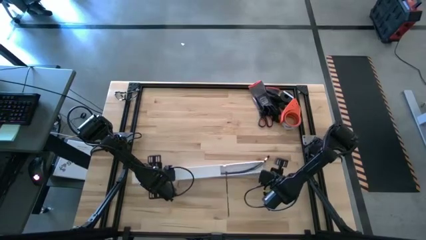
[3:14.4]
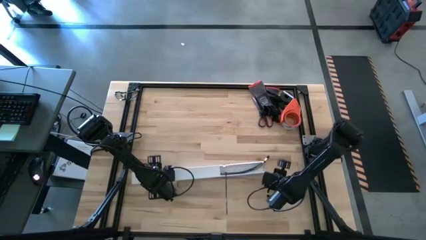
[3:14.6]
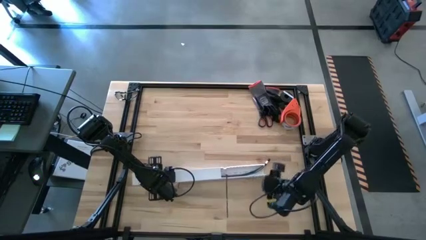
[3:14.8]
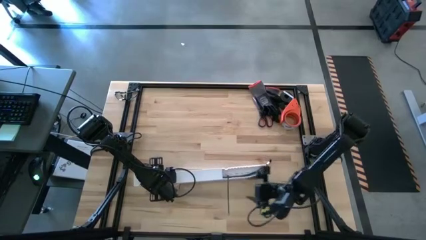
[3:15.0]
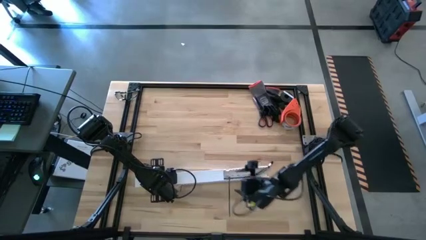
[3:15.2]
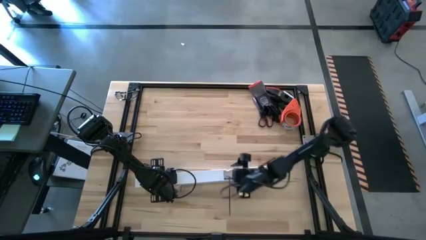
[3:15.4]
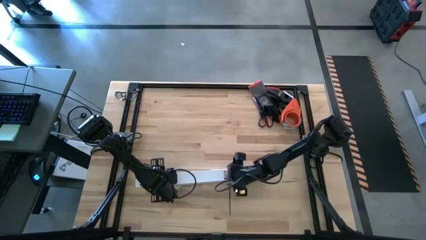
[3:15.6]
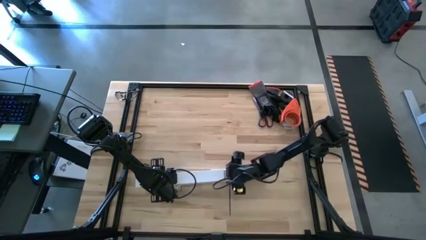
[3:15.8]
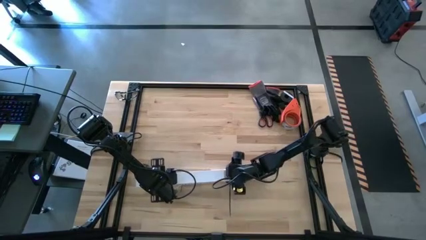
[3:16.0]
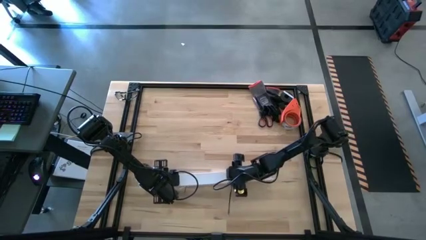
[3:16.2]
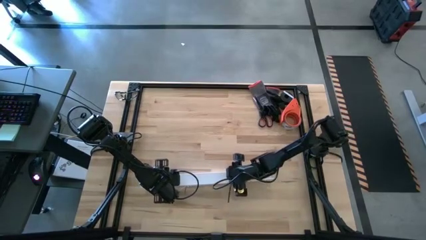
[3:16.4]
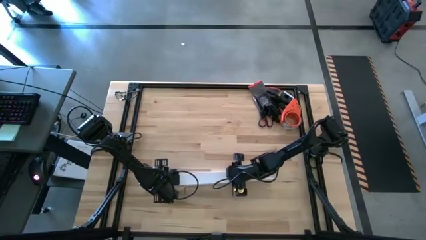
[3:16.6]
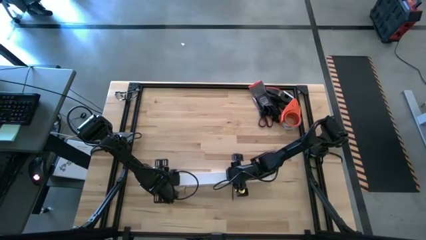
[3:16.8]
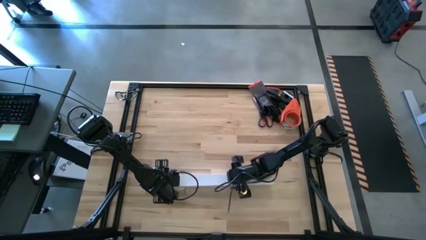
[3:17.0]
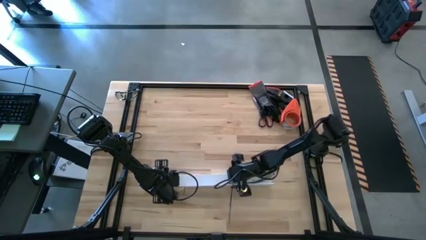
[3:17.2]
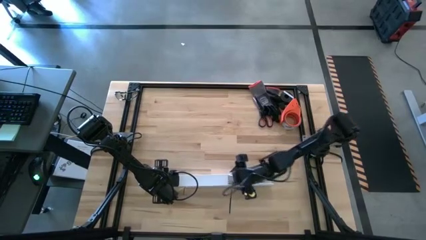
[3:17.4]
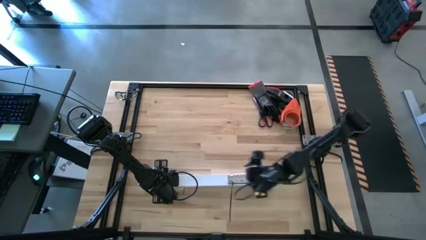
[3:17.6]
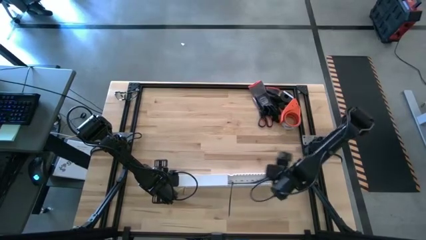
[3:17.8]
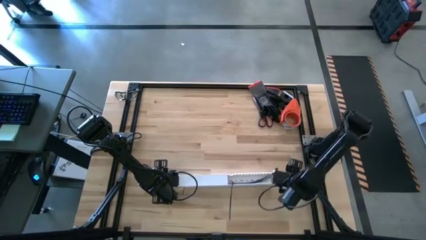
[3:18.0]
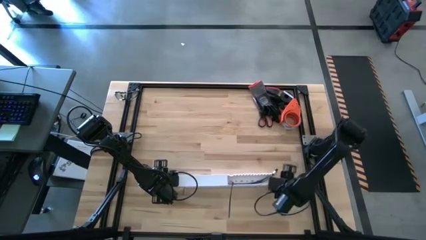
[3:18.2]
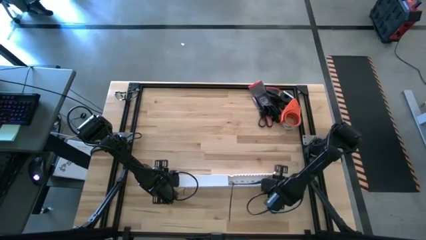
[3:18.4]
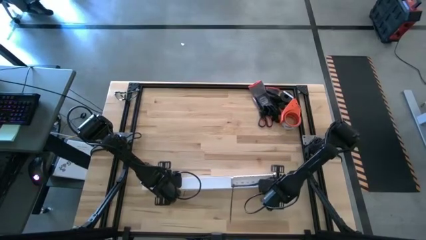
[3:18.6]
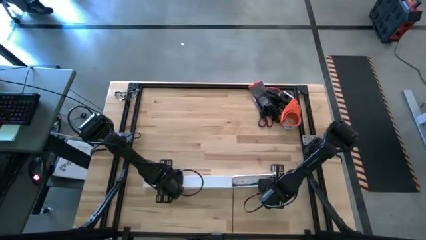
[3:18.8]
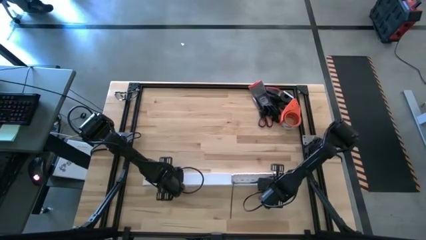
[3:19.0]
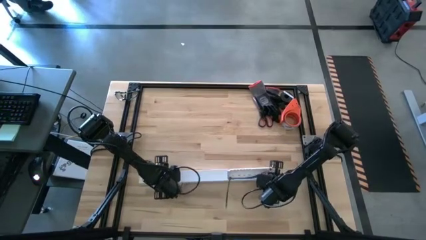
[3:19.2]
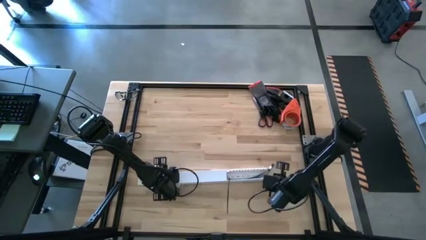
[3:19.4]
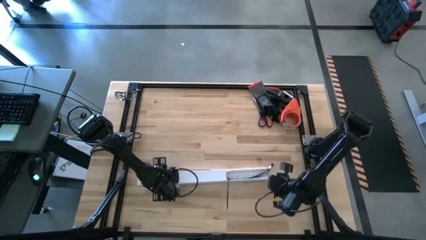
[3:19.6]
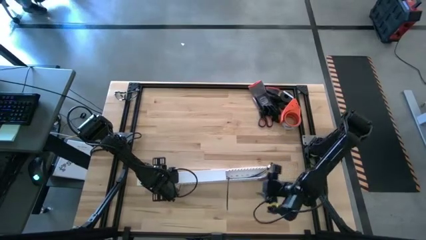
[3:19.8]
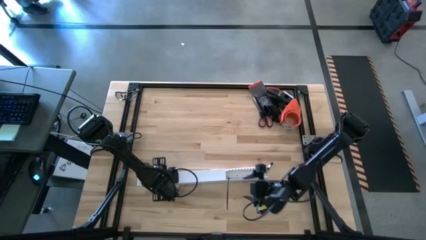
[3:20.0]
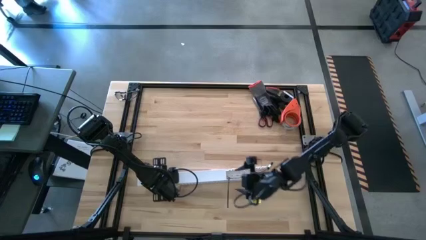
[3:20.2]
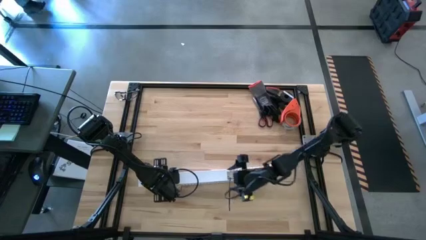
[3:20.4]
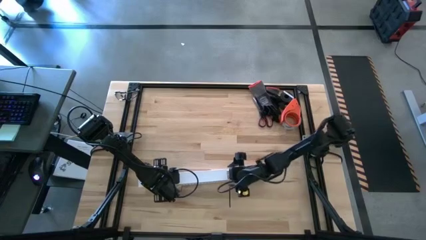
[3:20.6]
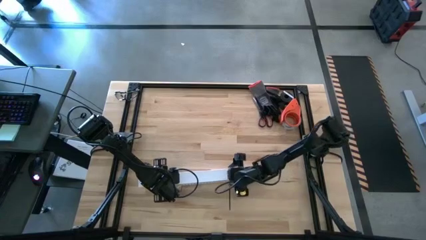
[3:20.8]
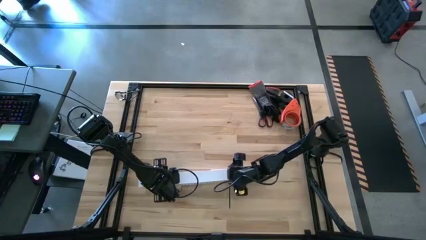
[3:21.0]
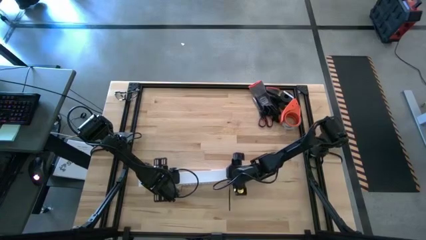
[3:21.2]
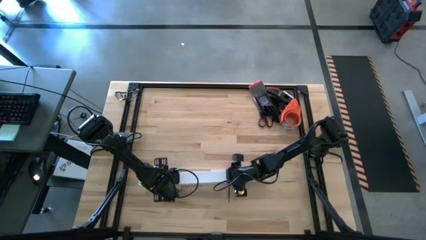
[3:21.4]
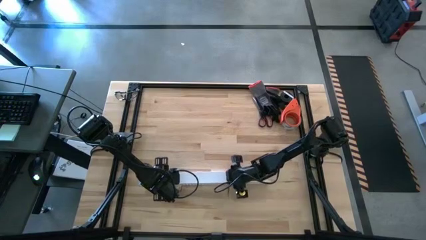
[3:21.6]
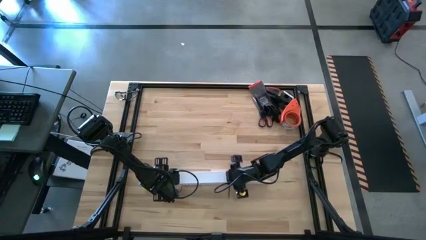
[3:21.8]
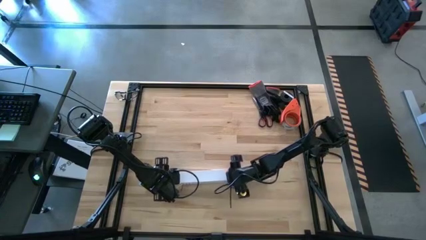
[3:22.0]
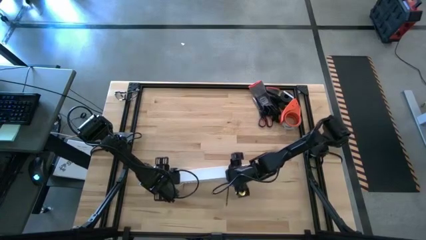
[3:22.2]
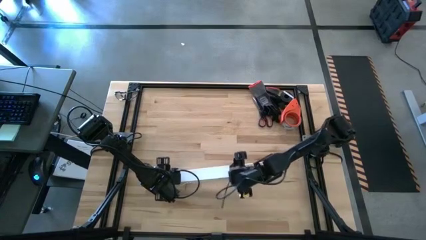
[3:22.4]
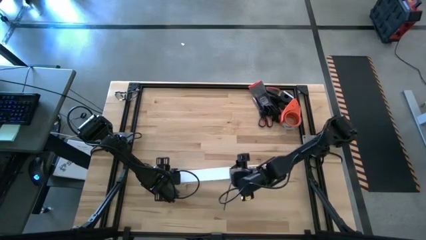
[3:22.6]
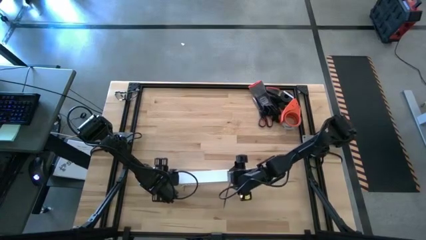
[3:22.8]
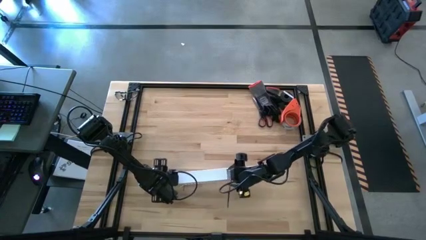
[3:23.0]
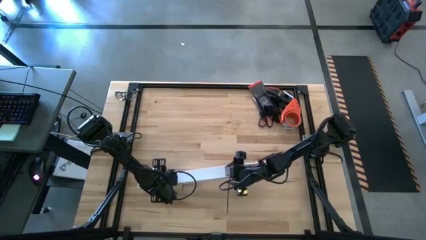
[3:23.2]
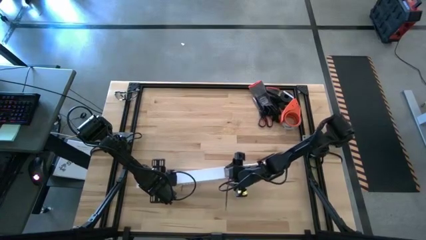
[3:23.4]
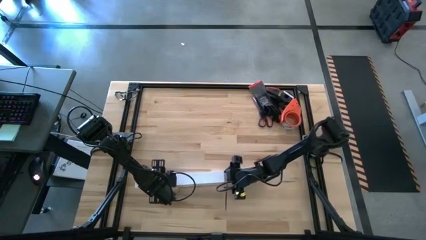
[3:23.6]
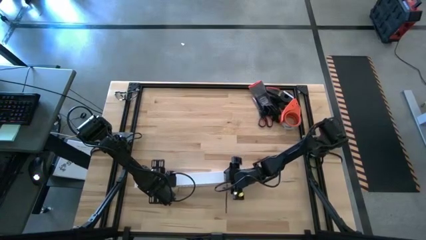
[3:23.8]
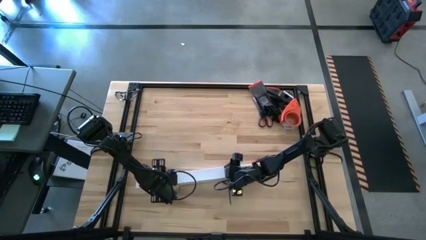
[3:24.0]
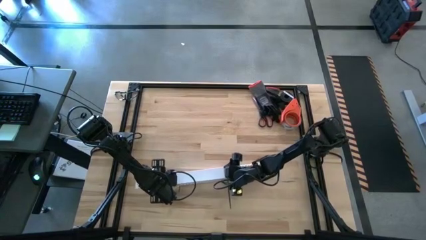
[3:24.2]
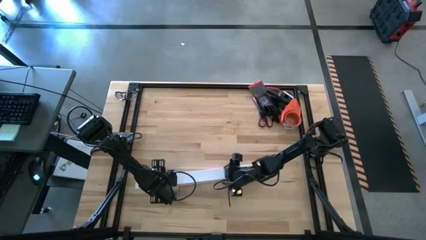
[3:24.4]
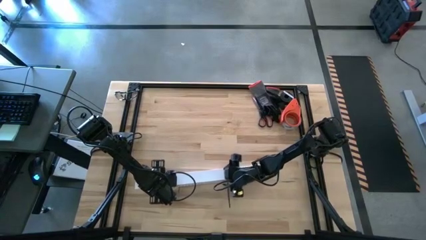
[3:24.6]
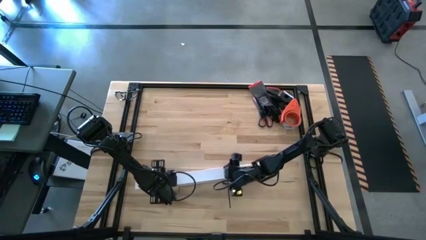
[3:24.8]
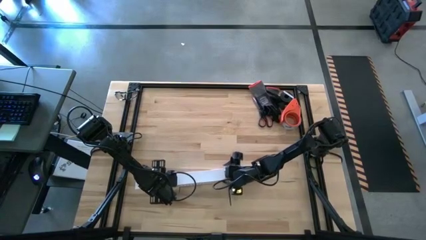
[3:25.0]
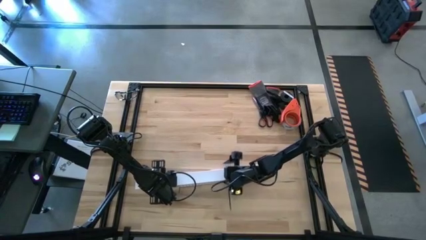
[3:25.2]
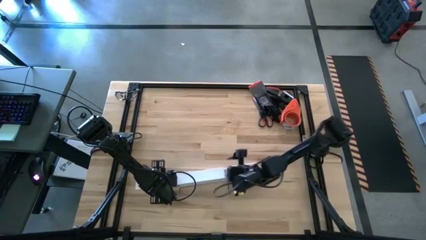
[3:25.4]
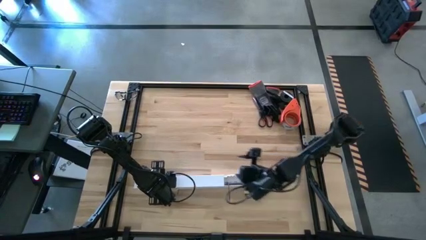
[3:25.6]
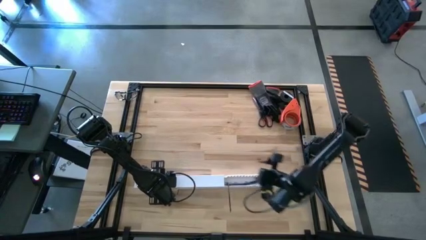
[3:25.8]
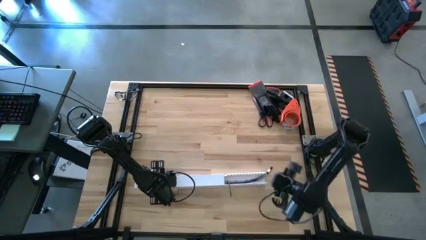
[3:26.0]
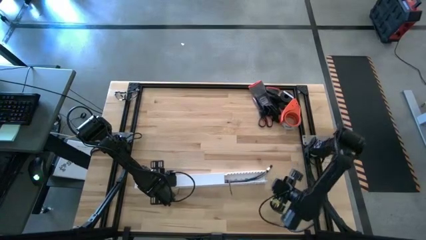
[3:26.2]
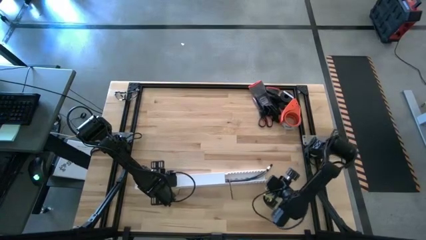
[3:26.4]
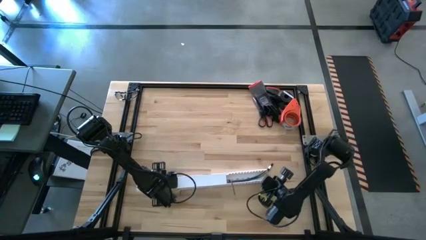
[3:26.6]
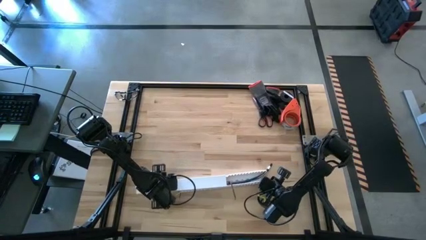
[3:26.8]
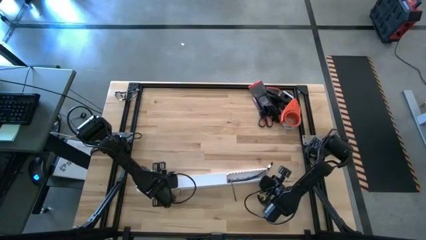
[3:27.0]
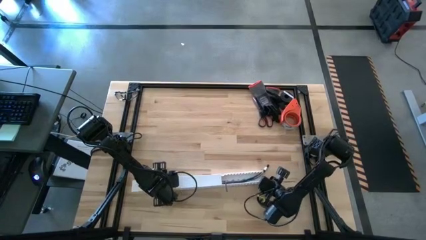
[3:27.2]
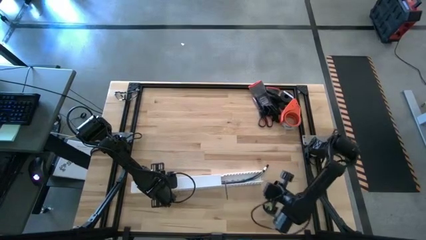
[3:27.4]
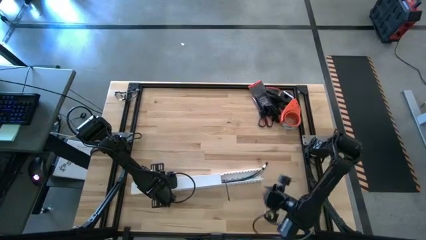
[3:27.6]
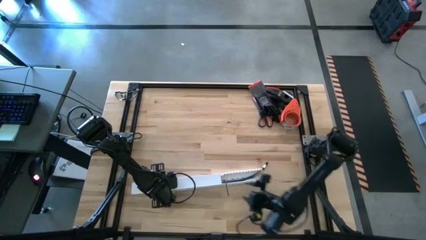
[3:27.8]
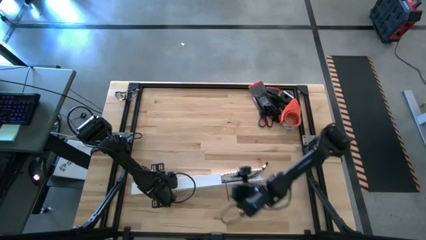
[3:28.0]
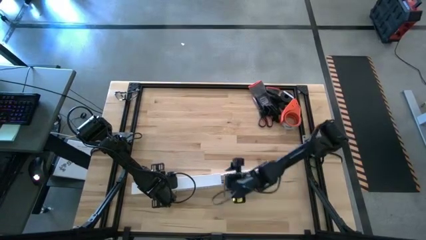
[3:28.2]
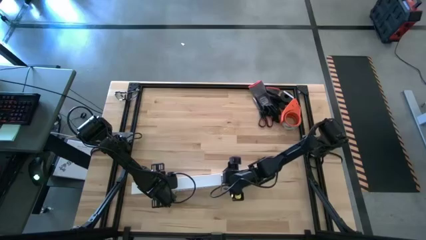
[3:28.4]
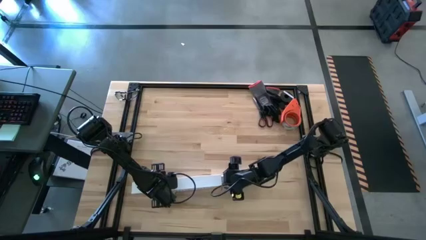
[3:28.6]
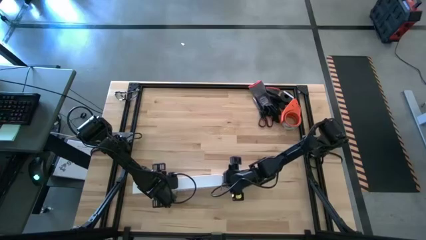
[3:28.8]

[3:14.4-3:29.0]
Task: Ziptie cables
Close the white cable duct
